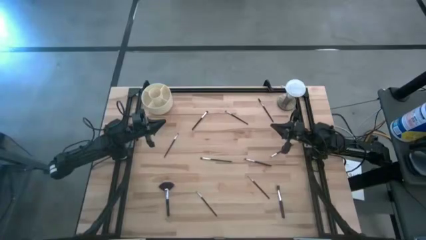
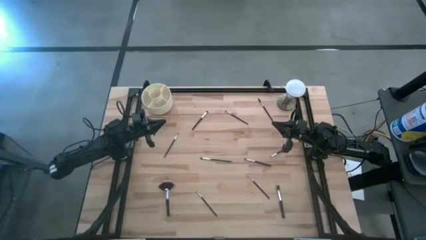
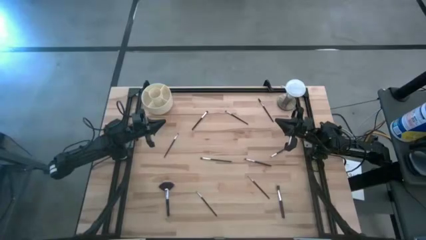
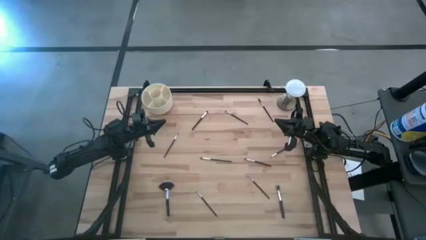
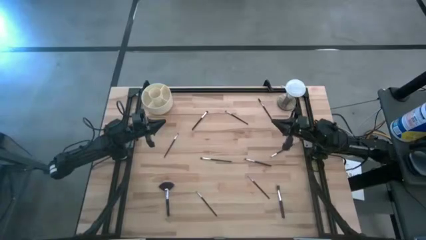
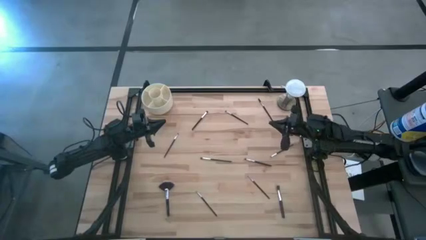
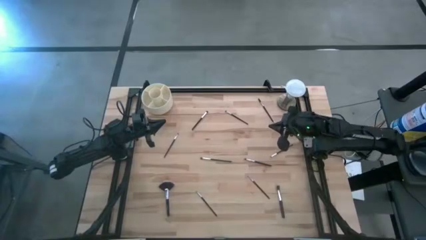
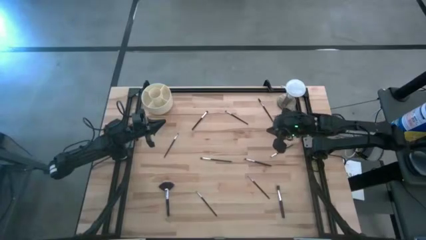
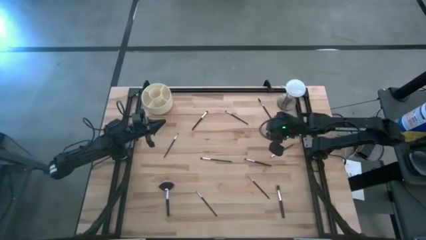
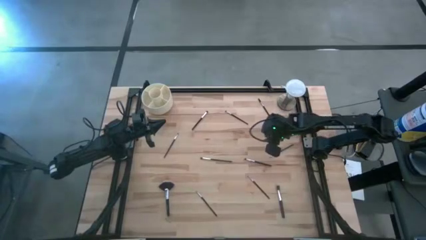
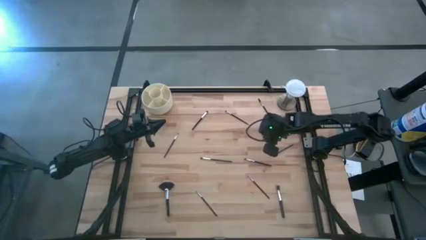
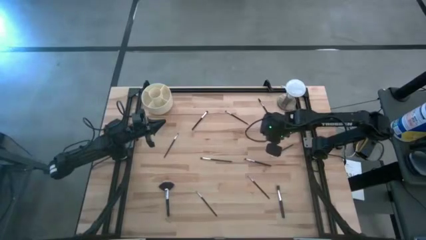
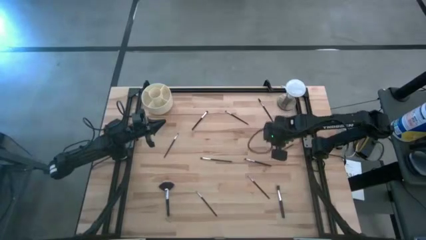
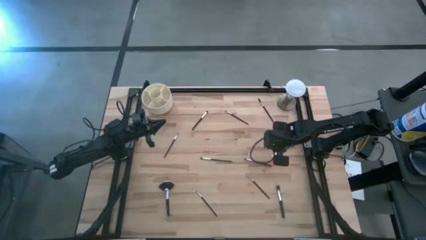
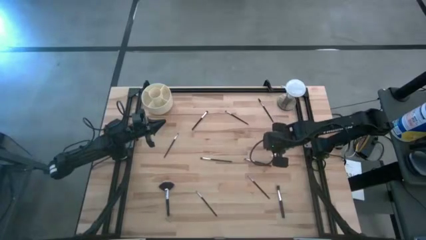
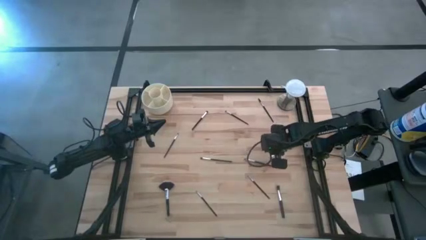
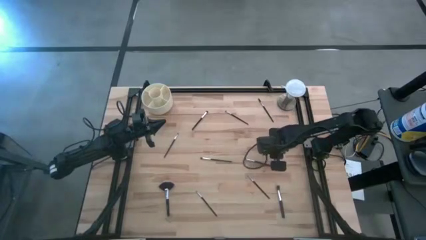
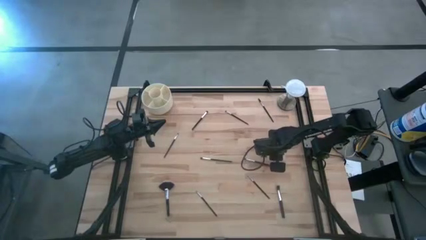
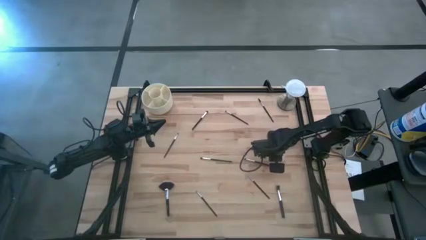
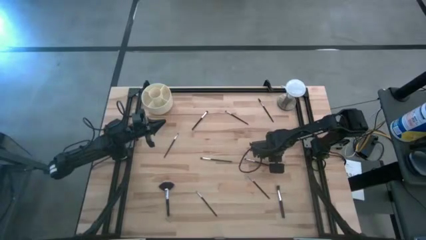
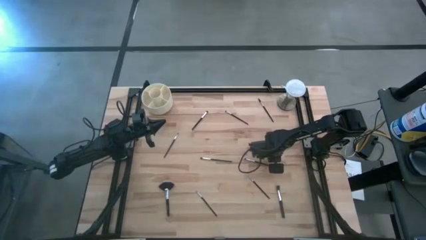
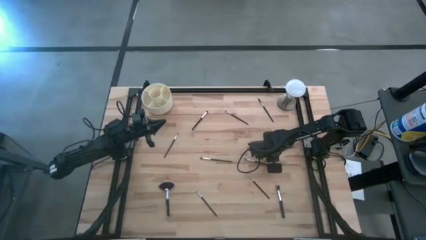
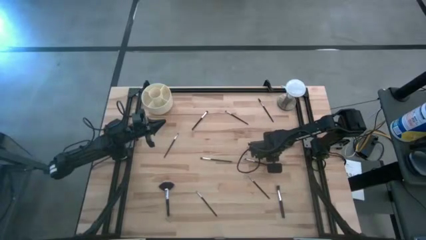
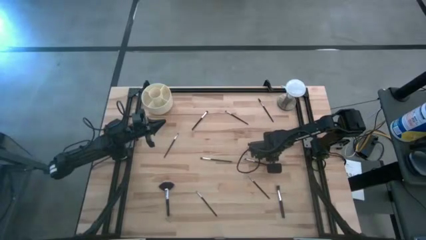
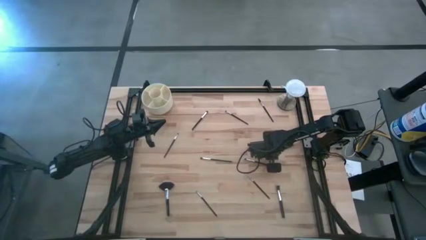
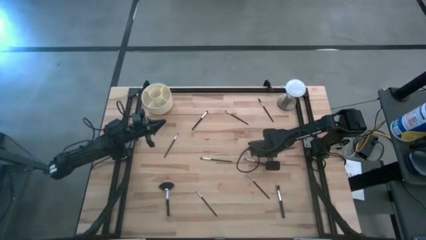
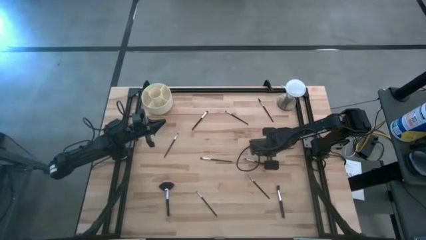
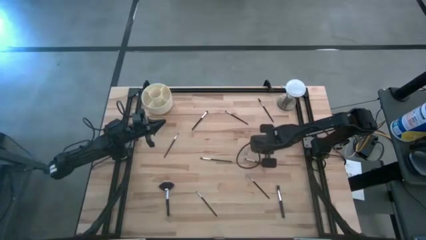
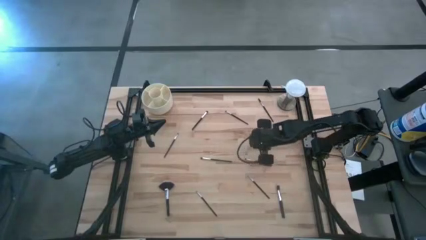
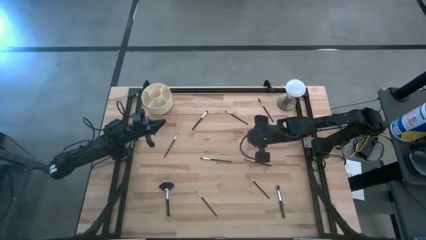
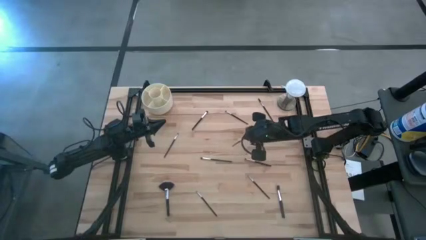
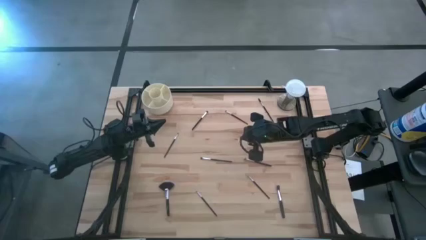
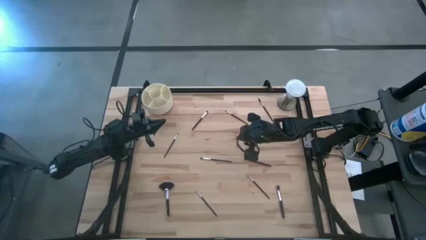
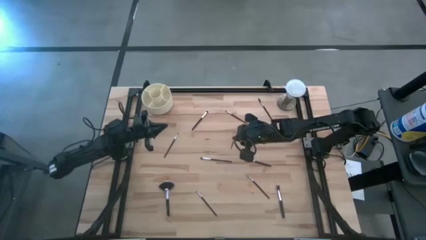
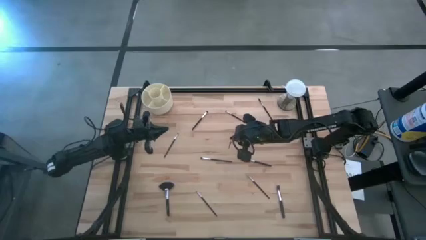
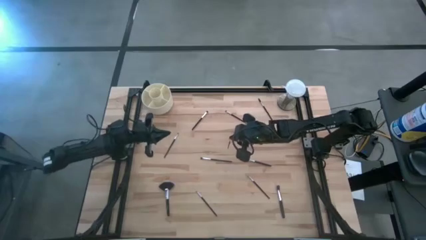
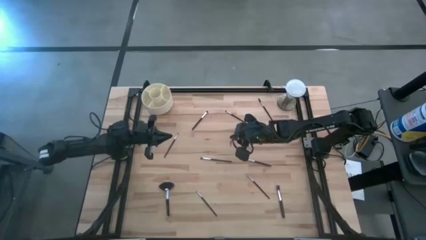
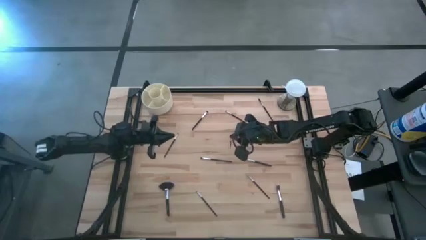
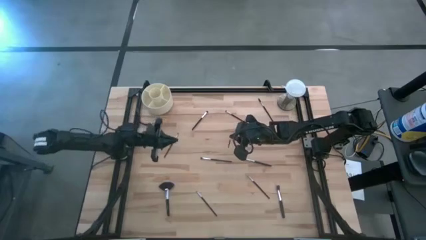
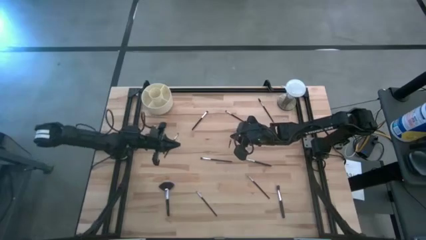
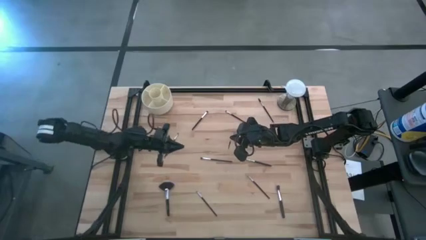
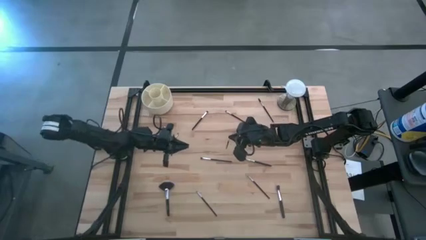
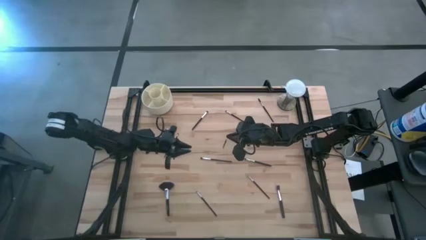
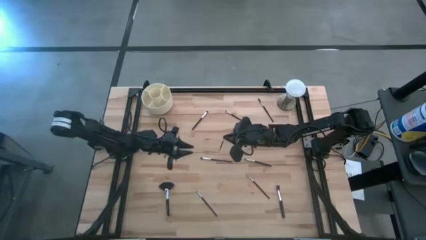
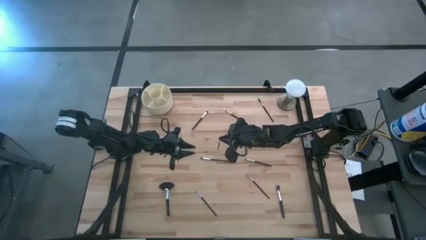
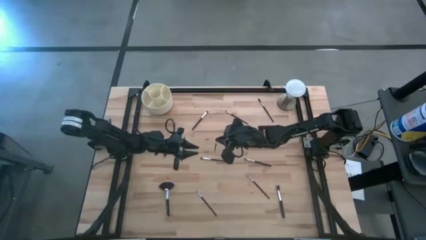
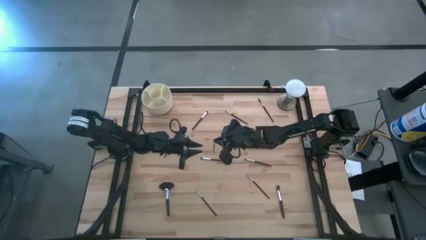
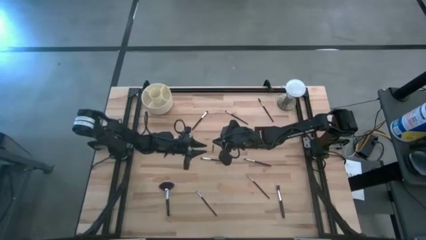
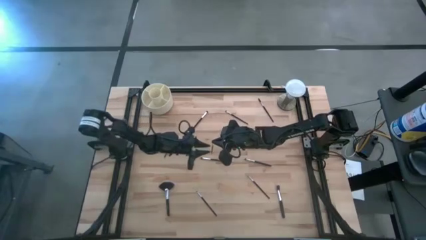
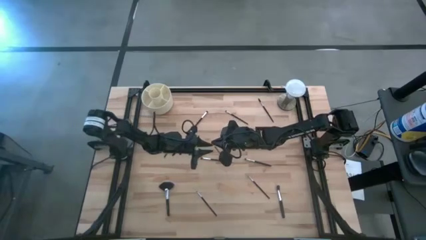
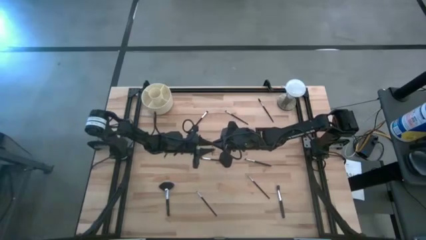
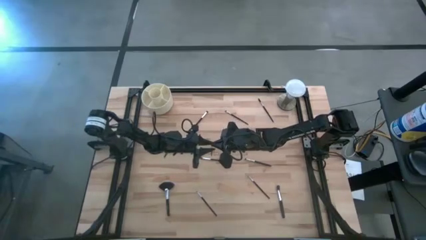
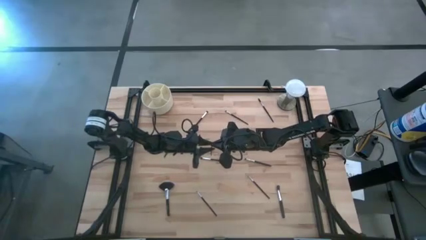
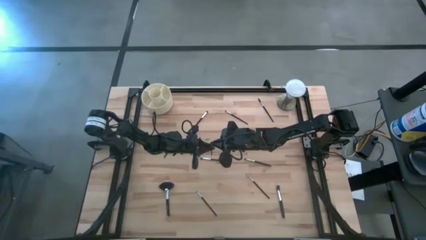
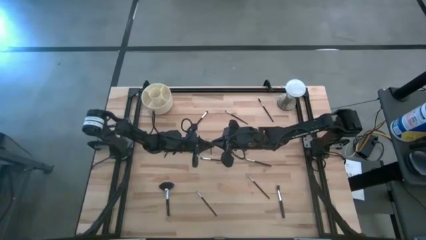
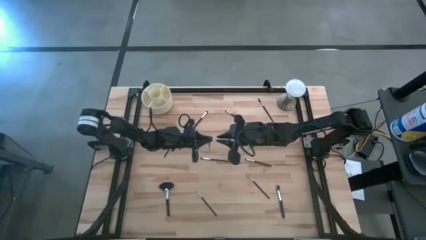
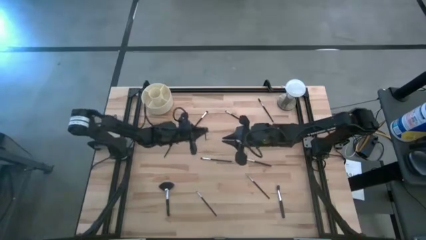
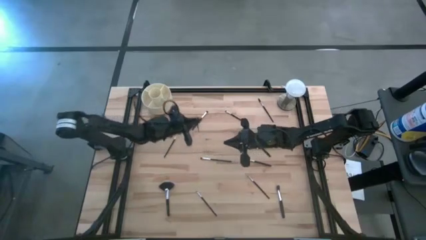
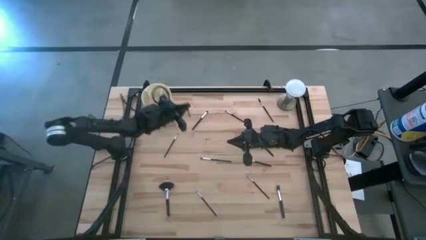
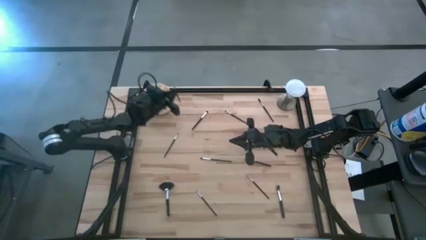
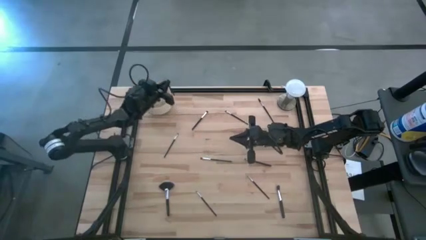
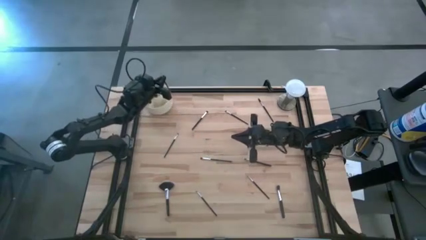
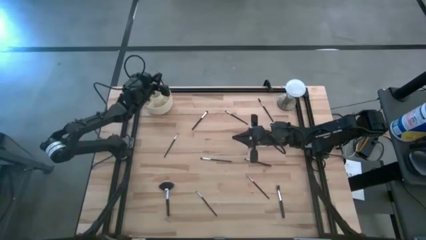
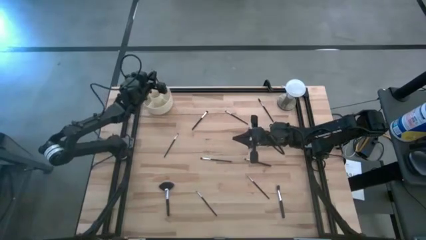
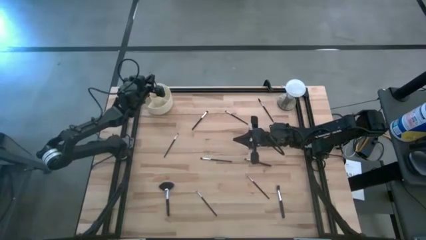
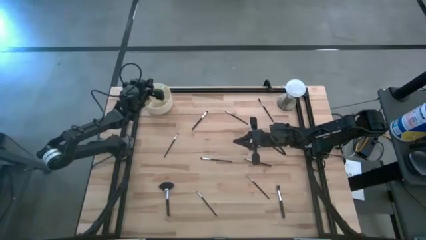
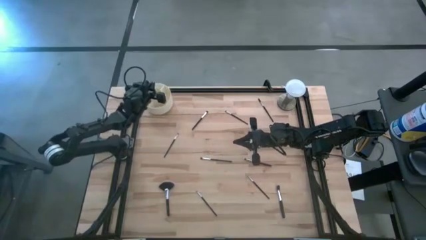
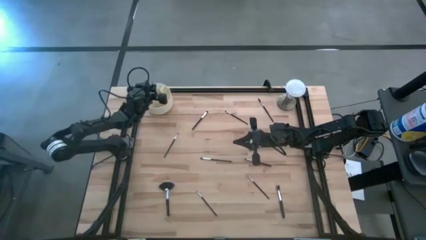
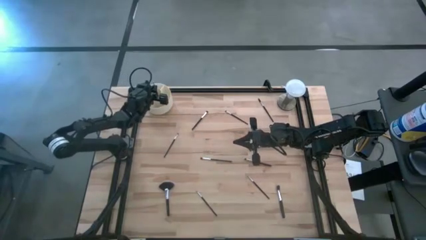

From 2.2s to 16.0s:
Task: Put items in baskets/containers
Put the eyeshadow brush into the organizer
